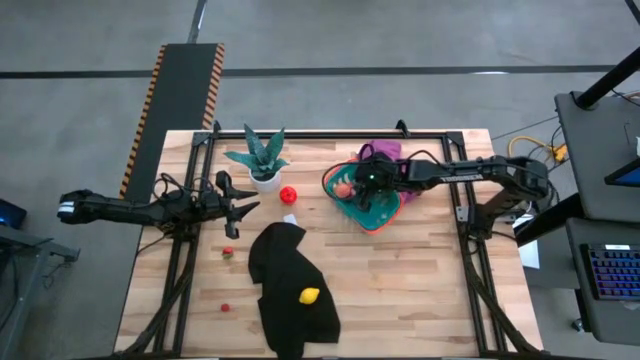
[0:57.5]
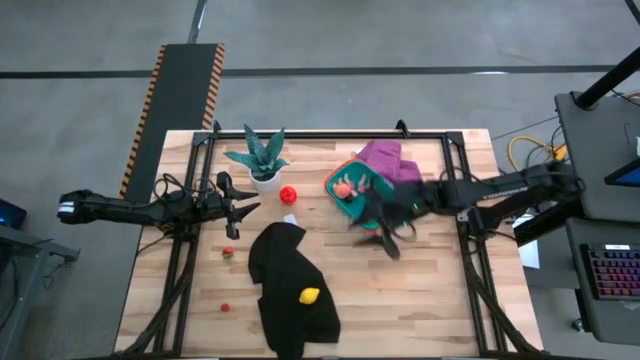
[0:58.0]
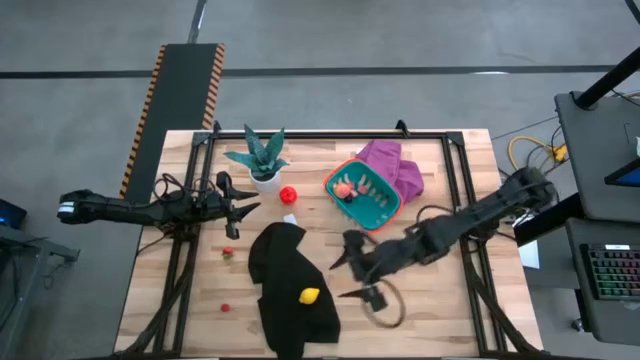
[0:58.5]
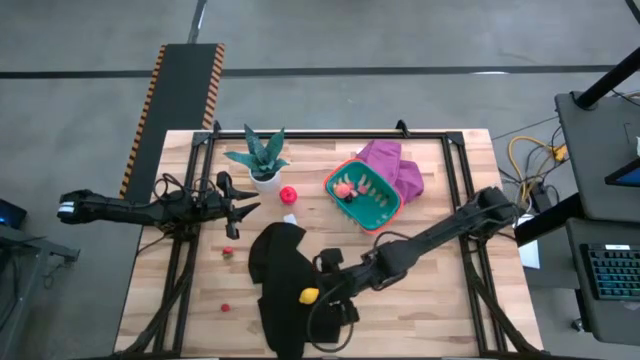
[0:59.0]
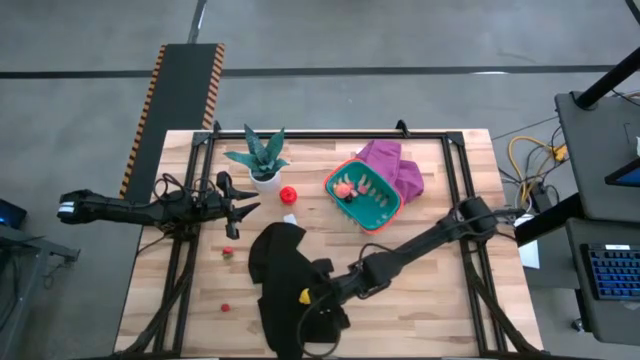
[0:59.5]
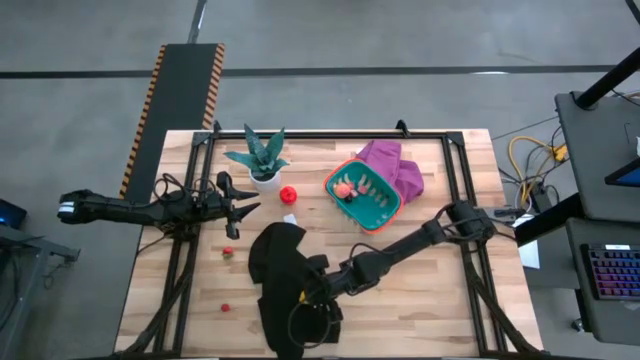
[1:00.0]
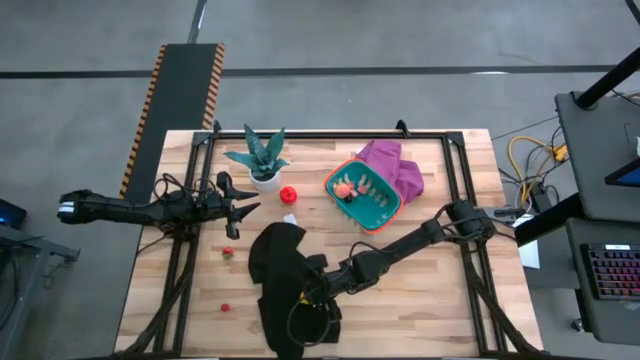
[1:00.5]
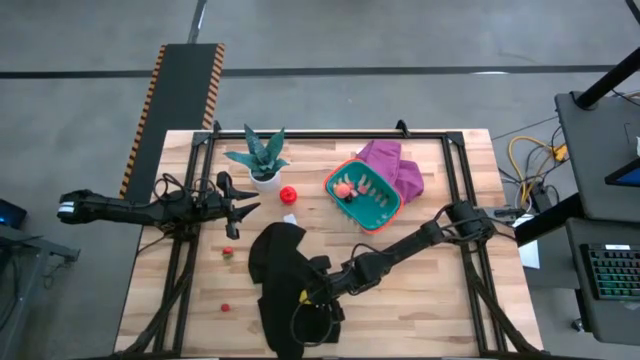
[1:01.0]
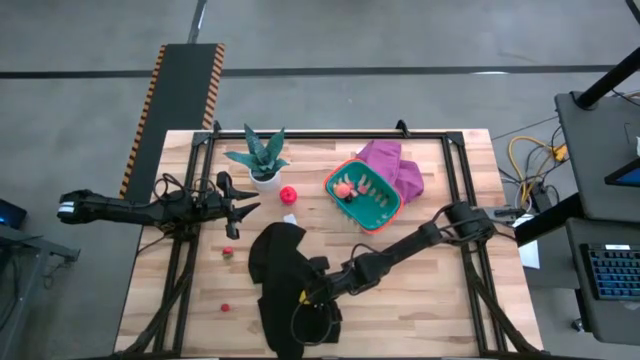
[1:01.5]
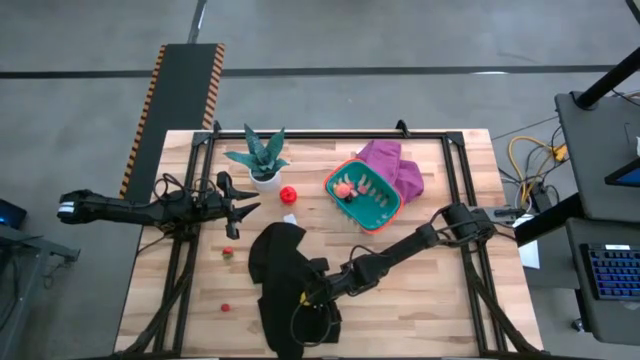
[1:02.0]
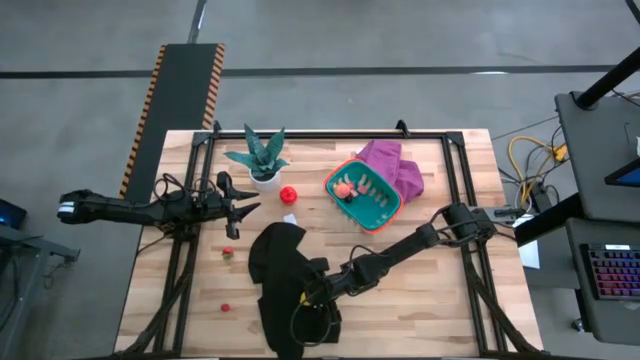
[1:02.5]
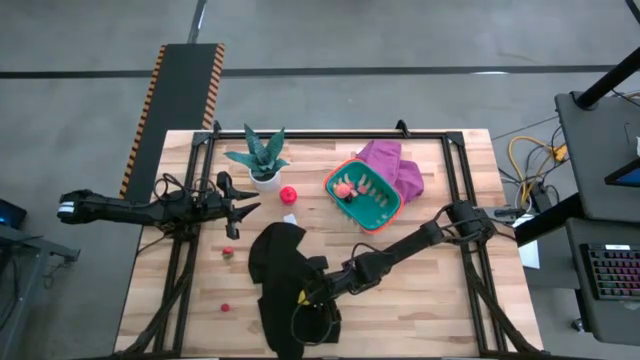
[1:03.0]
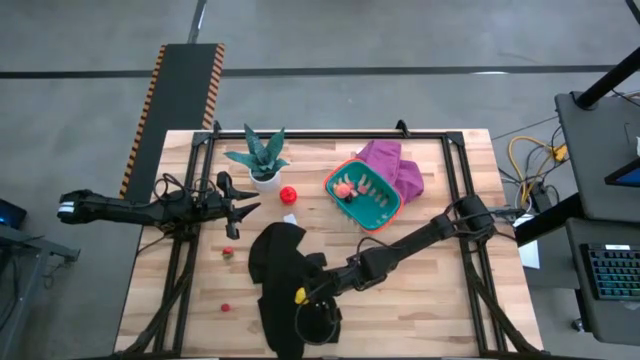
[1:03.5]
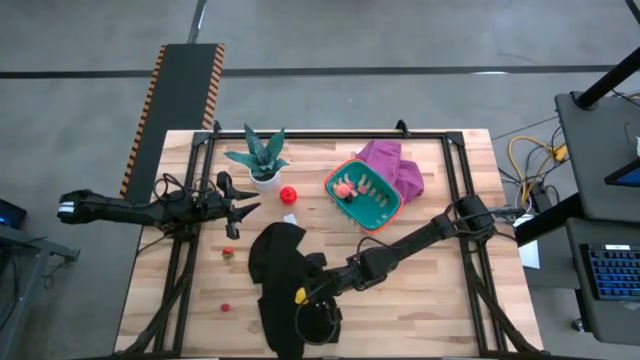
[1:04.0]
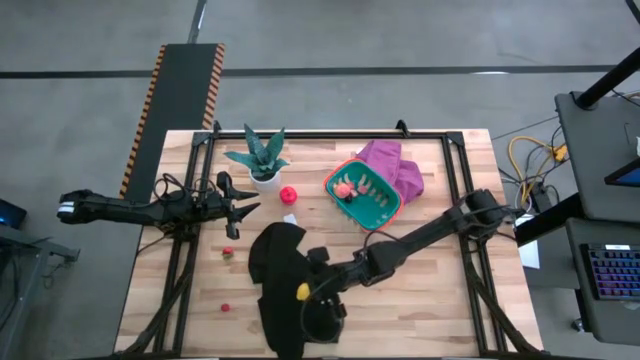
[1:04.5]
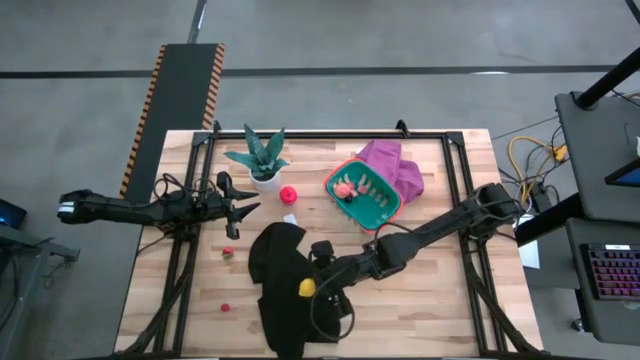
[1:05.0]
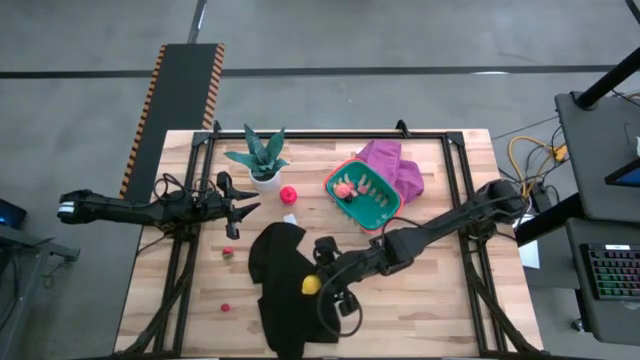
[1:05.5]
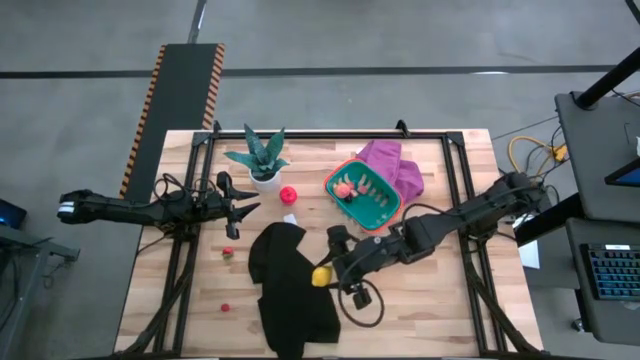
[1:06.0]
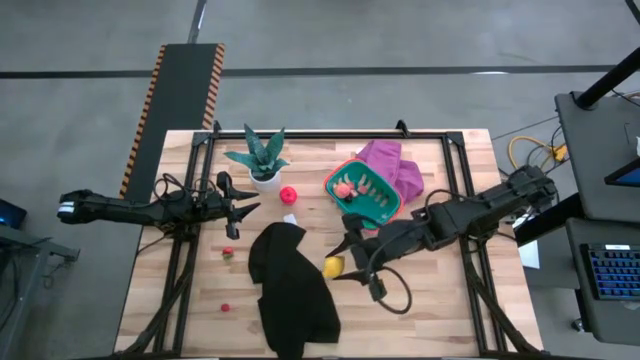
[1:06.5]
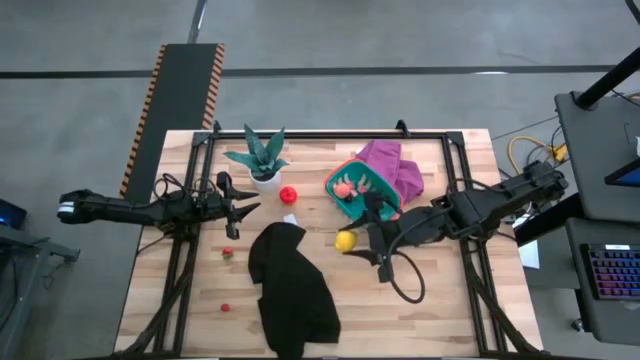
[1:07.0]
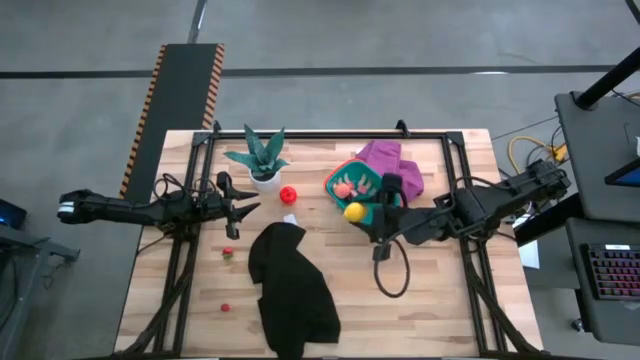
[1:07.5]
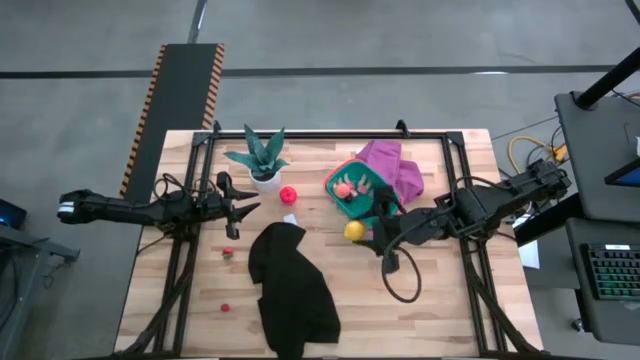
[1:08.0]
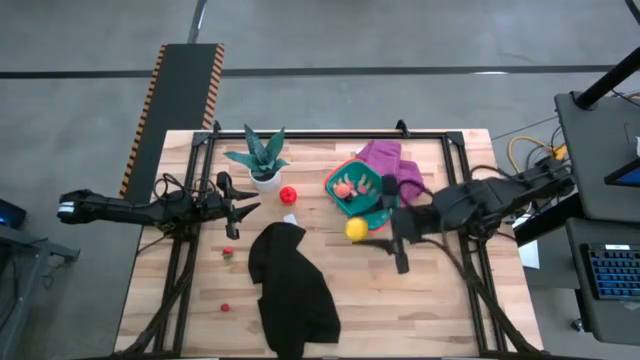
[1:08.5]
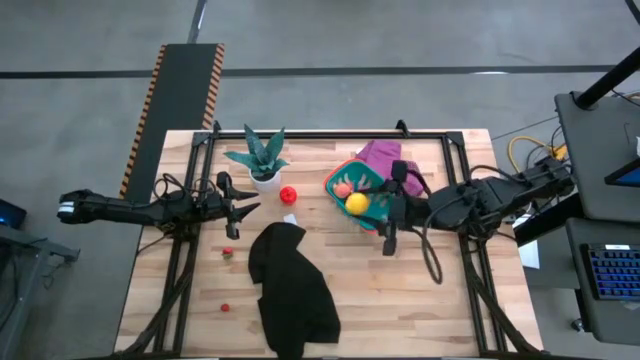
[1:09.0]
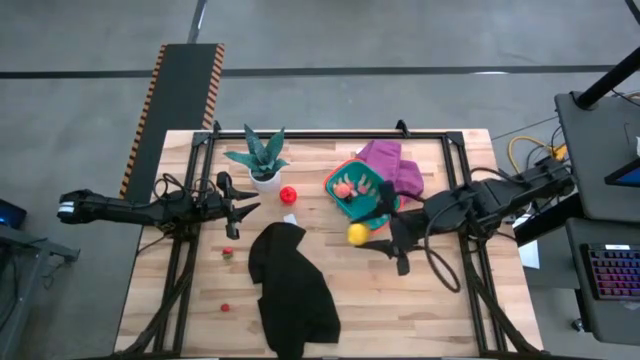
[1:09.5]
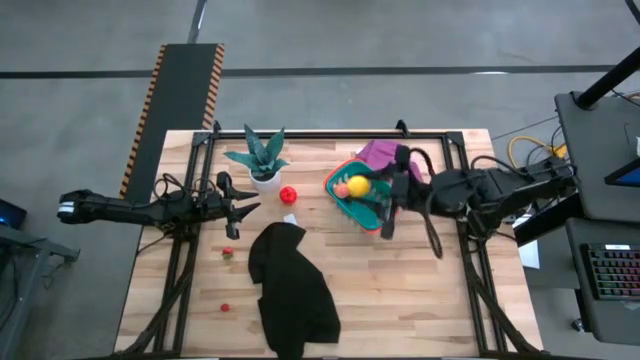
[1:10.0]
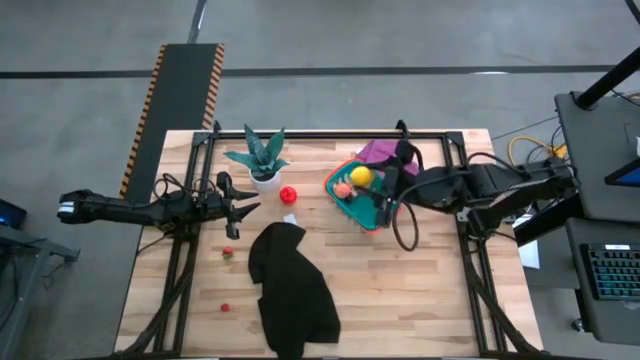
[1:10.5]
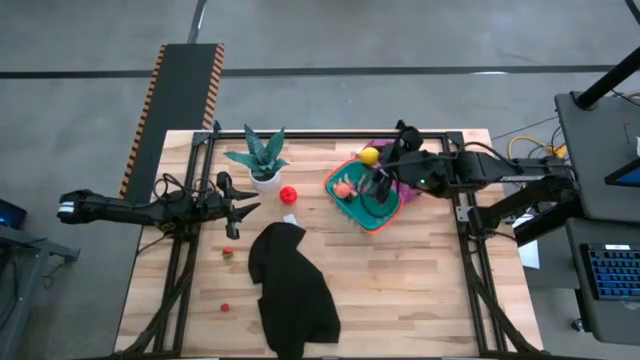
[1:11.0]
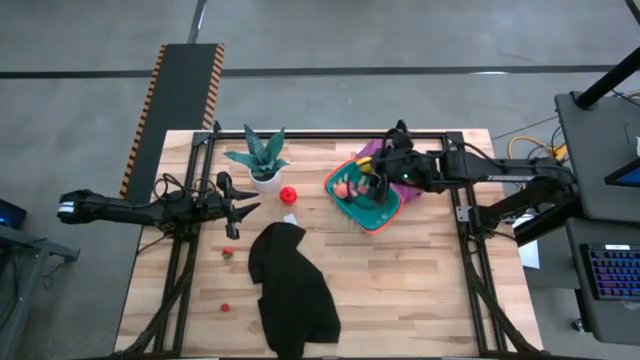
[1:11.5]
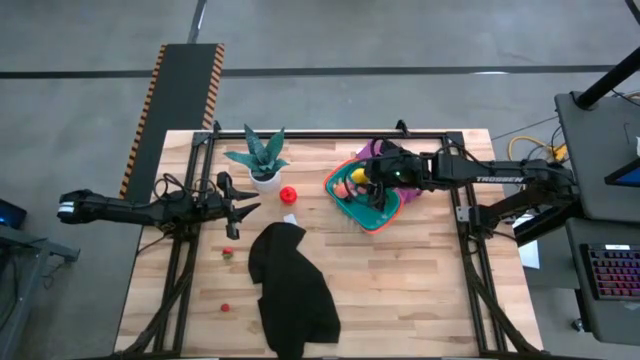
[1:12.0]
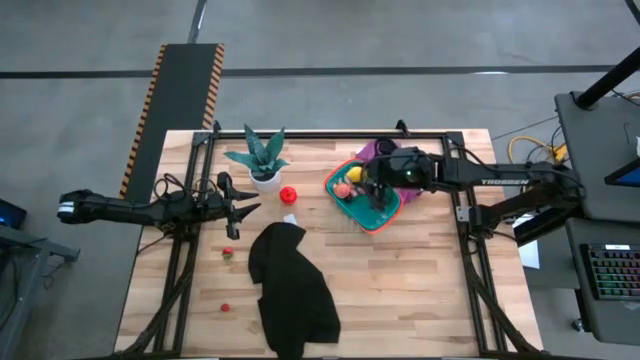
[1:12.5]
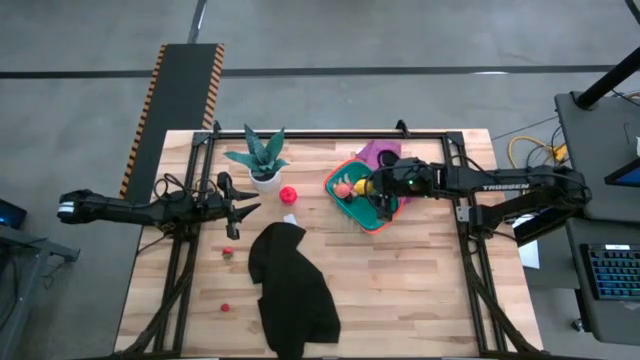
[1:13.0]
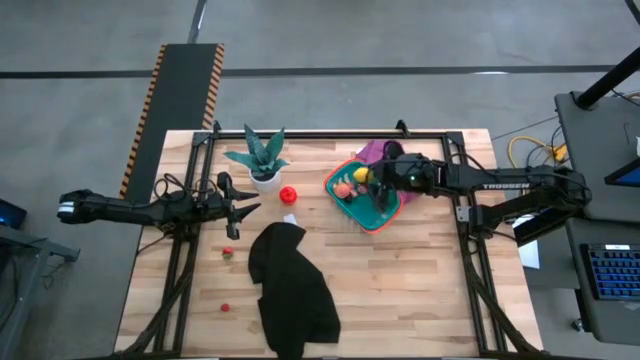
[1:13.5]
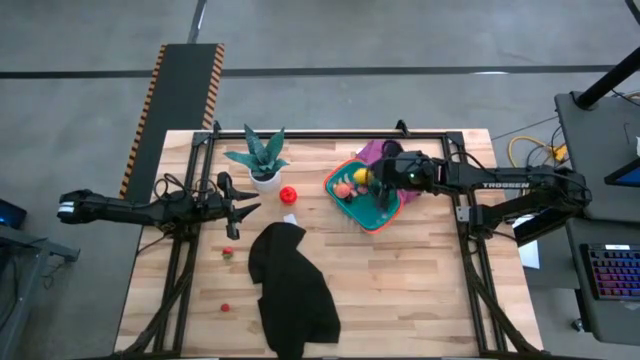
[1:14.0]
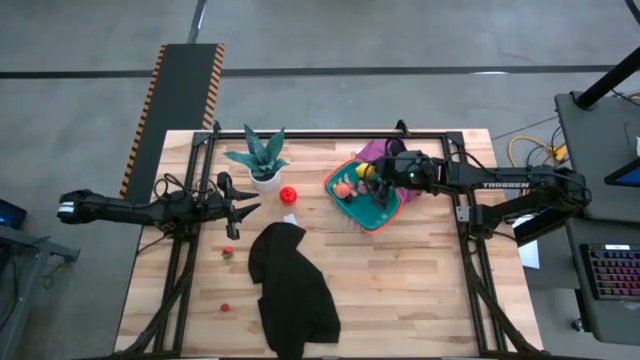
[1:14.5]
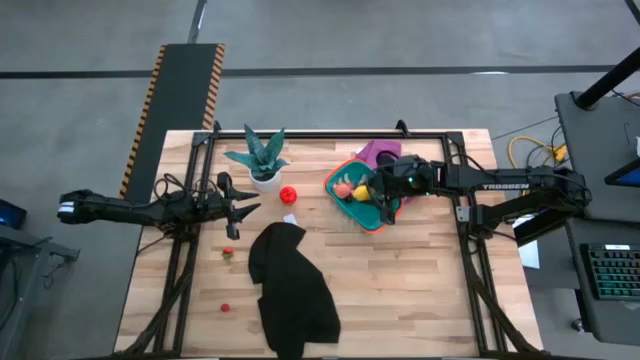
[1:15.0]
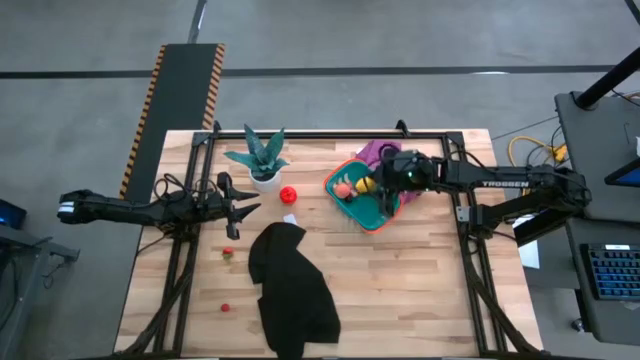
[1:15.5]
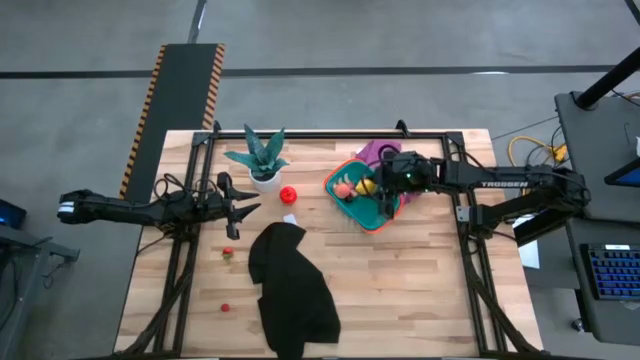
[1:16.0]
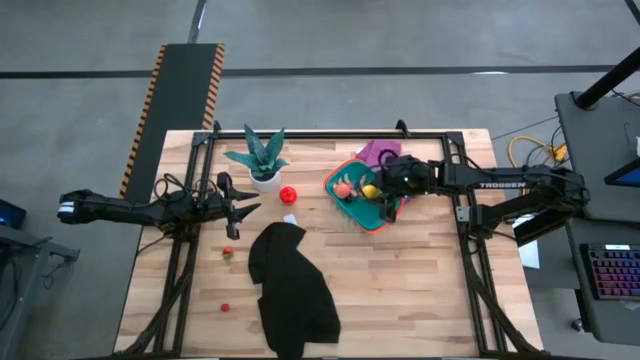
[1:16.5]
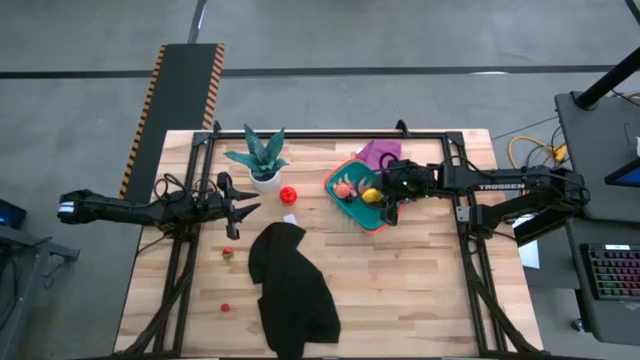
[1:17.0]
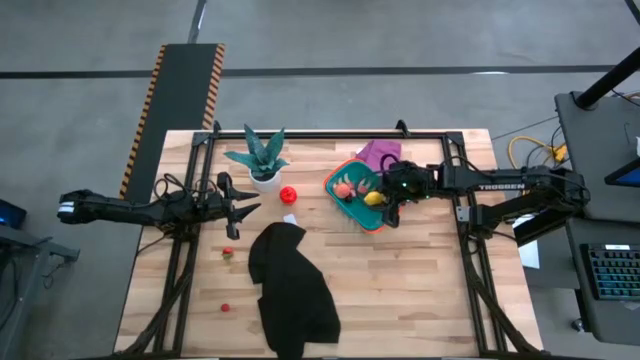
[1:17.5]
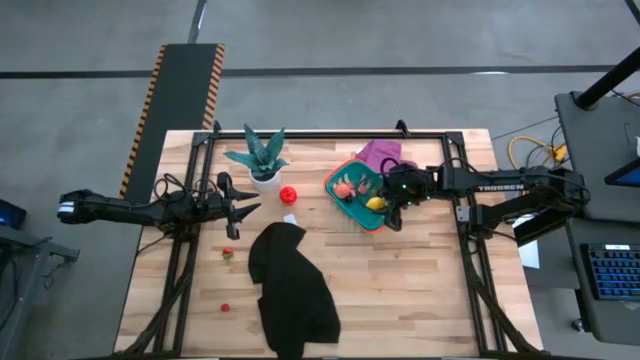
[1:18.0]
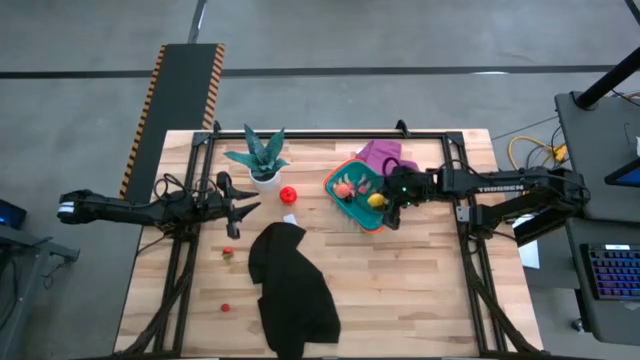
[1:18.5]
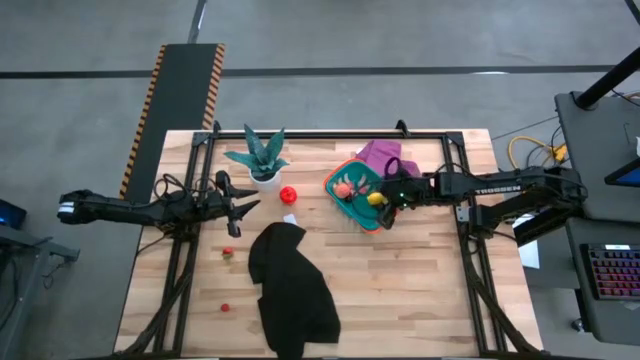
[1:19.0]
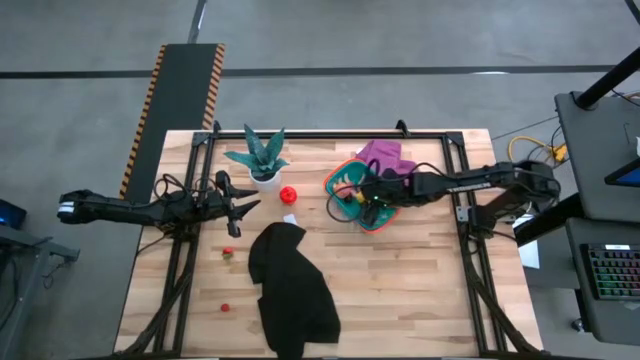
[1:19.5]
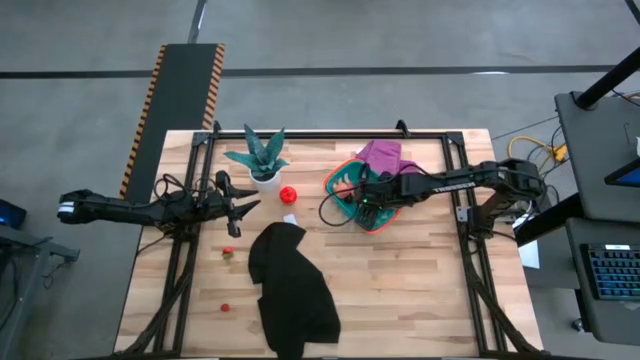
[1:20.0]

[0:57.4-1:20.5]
Task: Pick and placing Produce into tupperware
Put the lemon into the green basket
